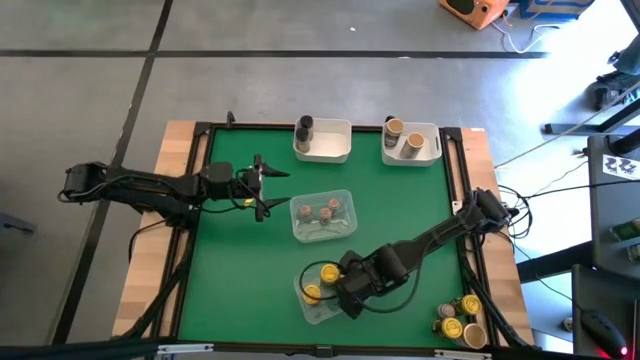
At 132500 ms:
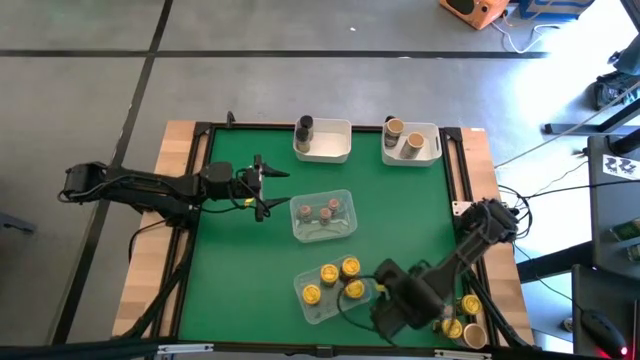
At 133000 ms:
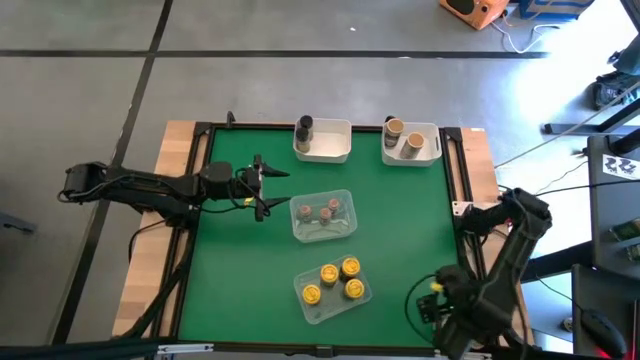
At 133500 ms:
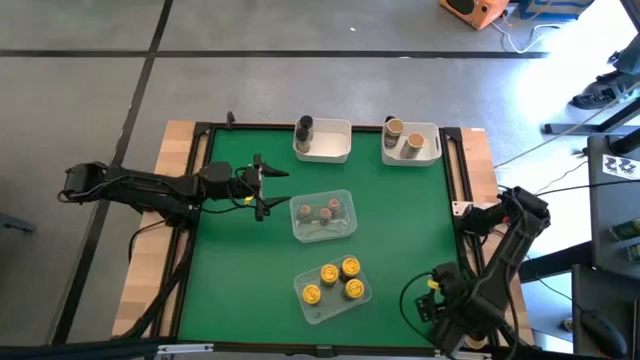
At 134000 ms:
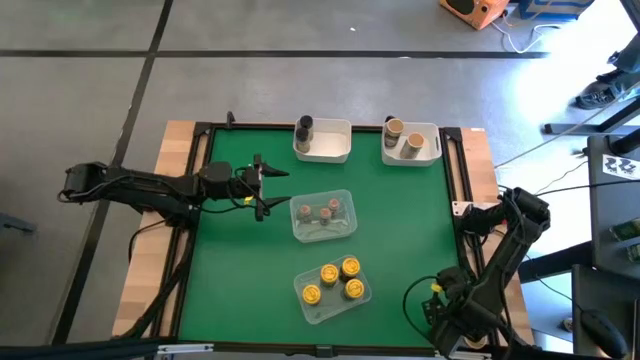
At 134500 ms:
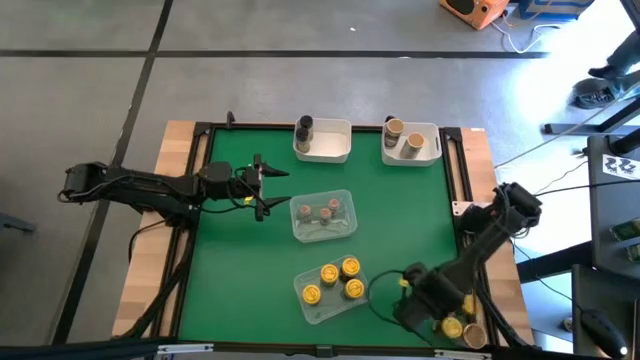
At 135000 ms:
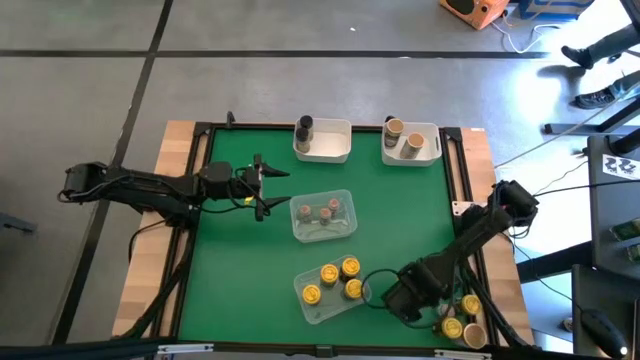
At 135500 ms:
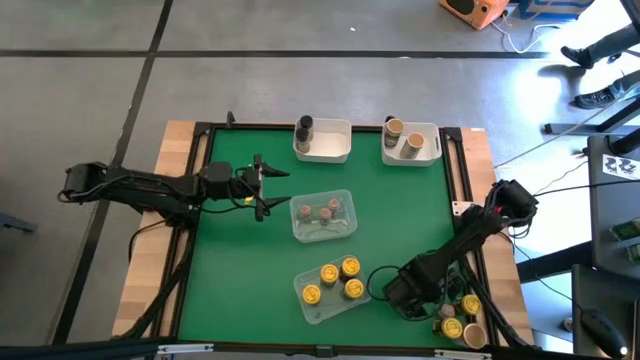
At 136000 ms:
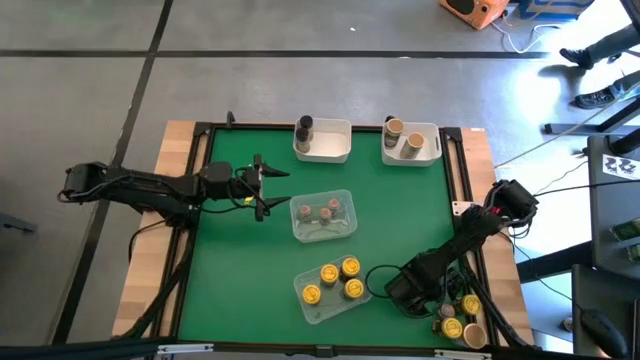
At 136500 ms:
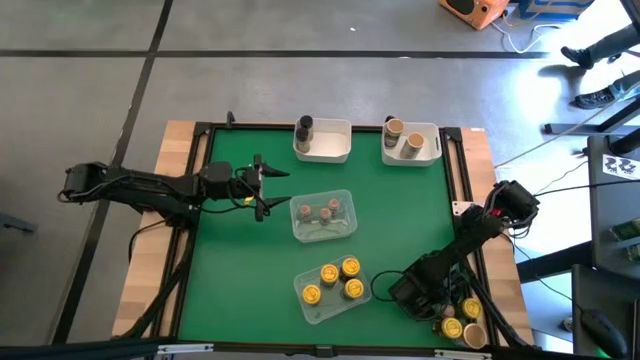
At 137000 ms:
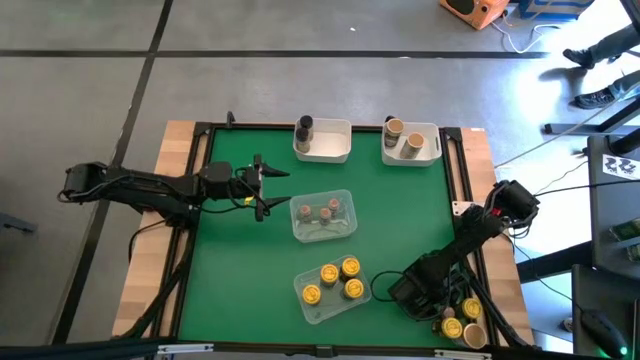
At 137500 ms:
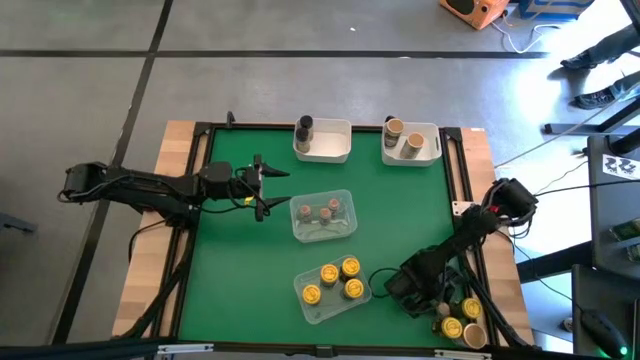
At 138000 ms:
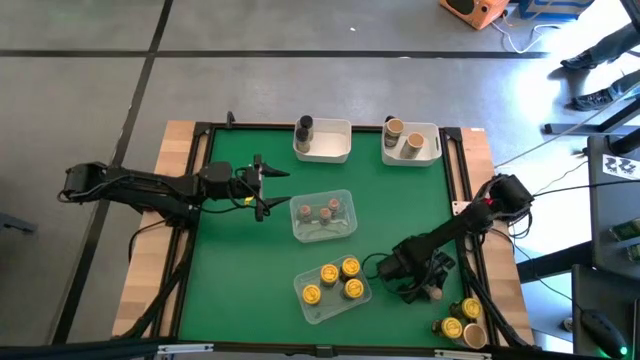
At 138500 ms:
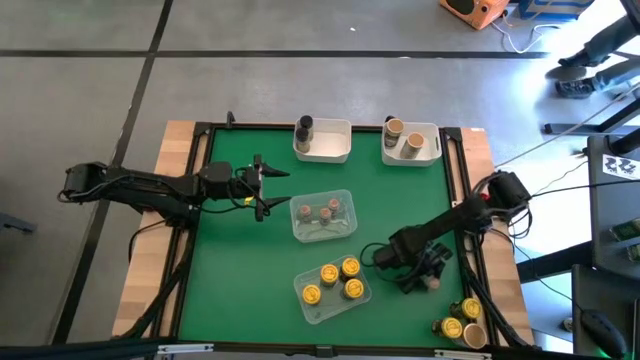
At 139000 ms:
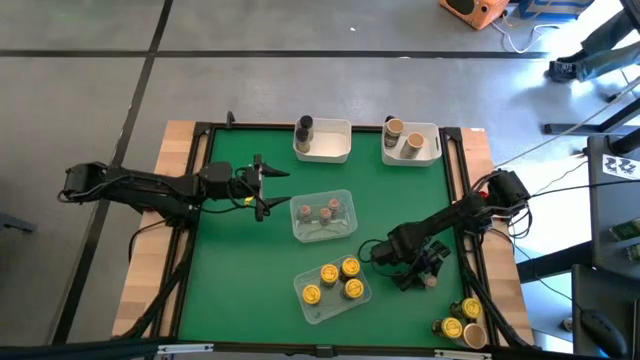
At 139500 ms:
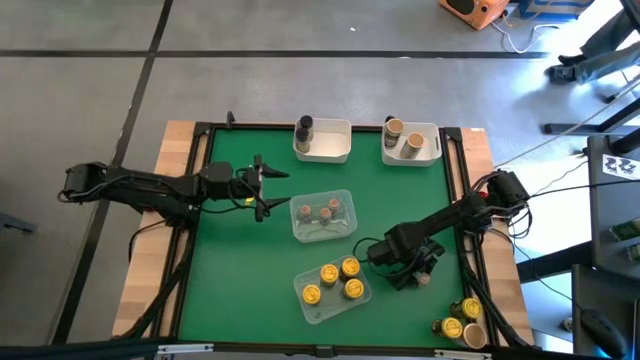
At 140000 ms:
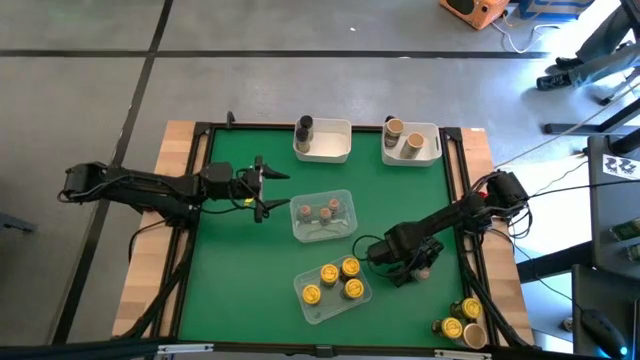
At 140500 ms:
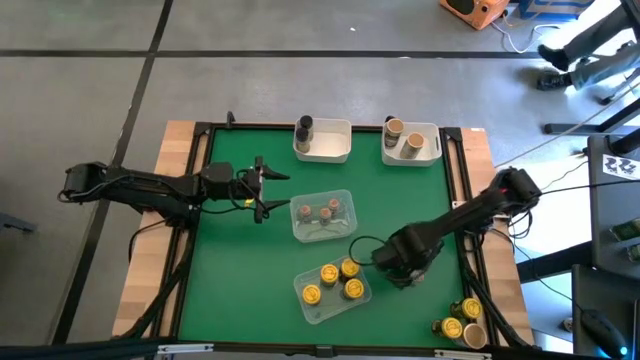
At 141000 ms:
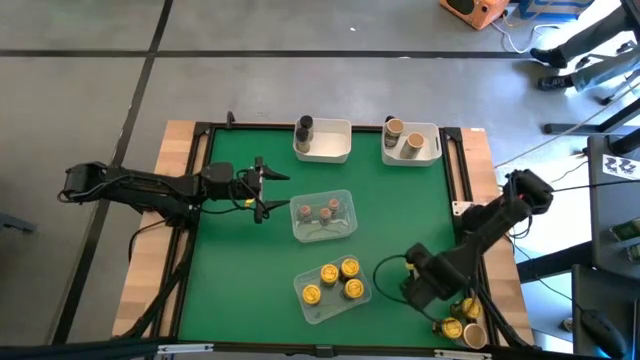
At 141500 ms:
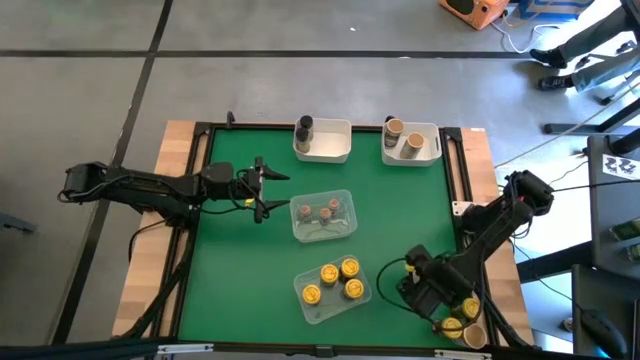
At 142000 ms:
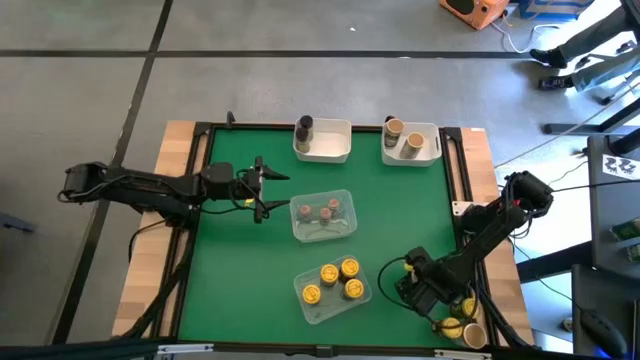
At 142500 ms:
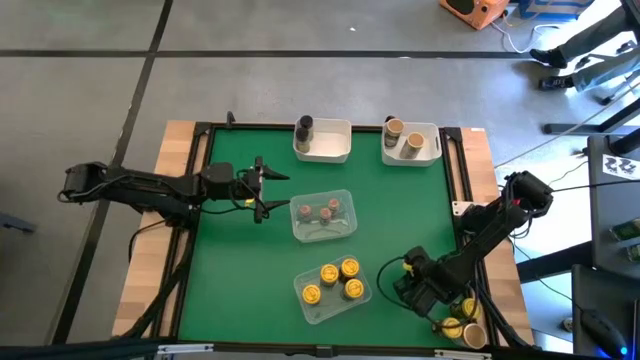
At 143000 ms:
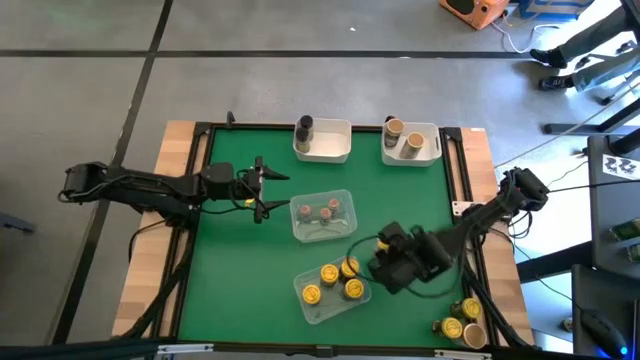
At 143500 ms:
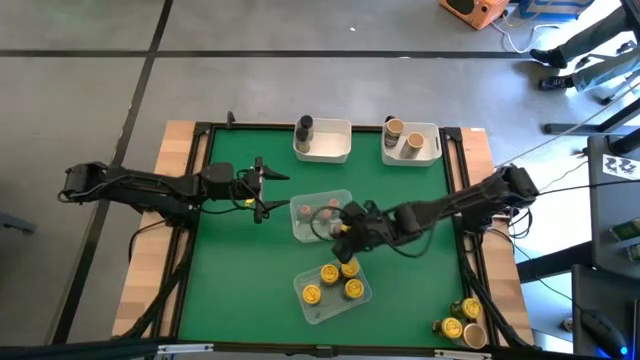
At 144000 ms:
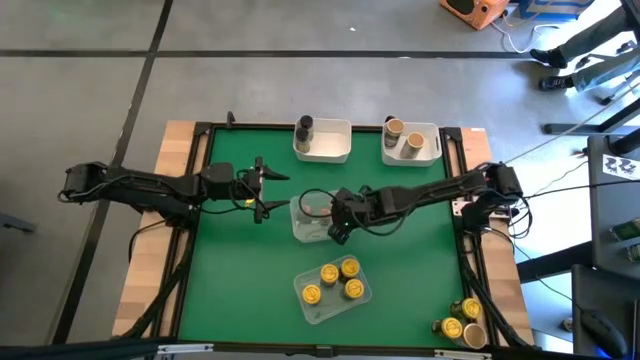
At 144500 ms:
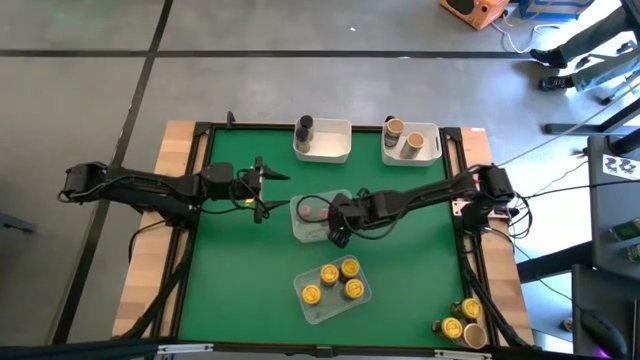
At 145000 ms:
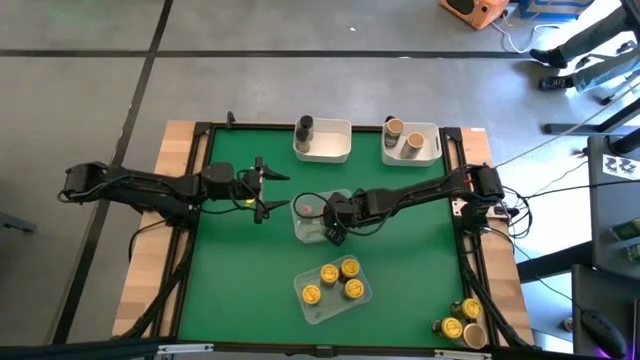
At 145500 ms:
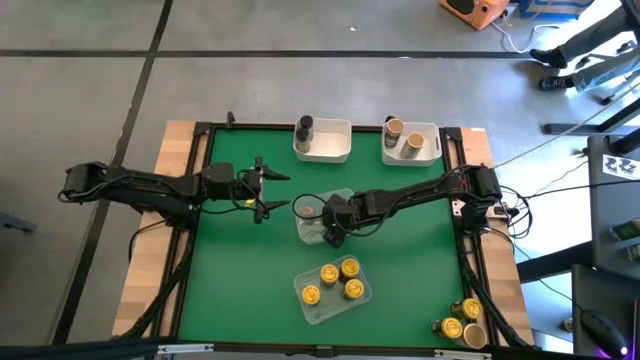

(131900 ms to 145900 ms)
Task: Sort spices by type
Put the transparent seasoning bottle into the center transparent bin

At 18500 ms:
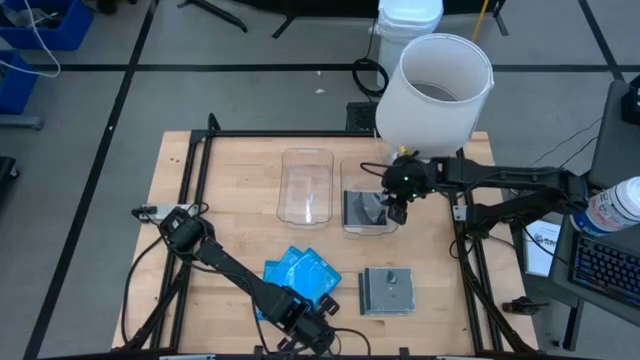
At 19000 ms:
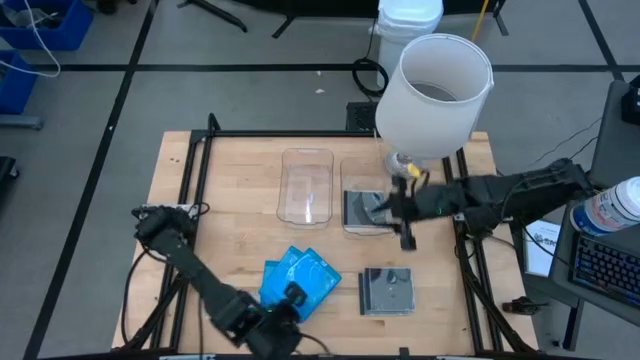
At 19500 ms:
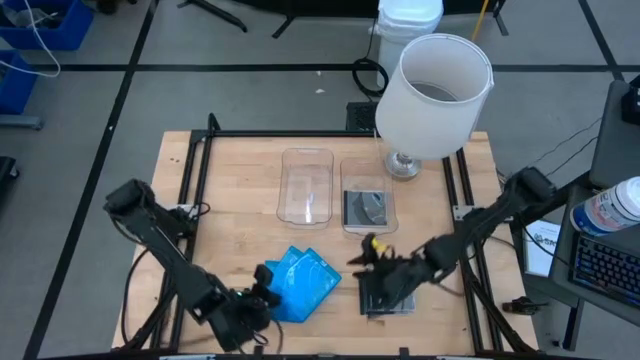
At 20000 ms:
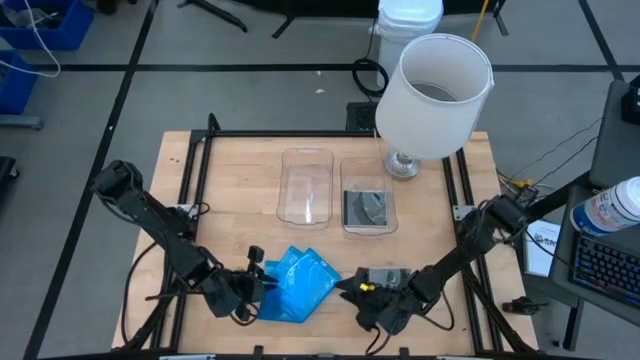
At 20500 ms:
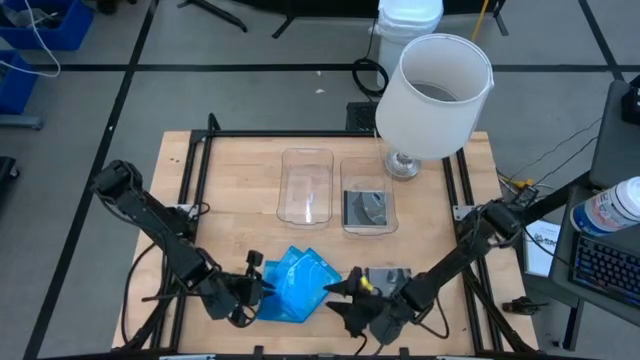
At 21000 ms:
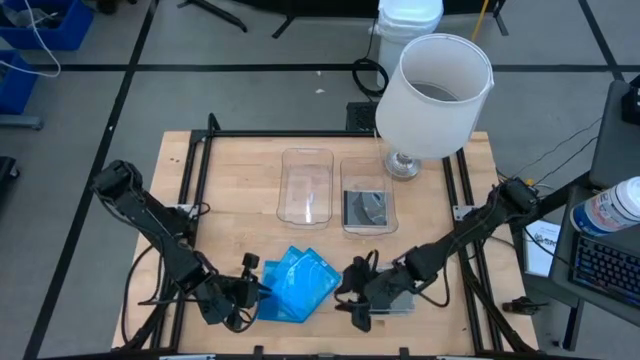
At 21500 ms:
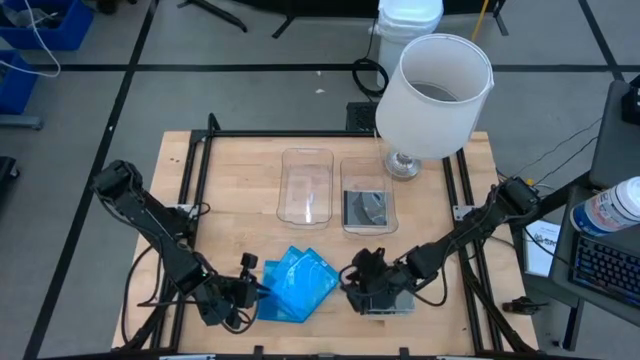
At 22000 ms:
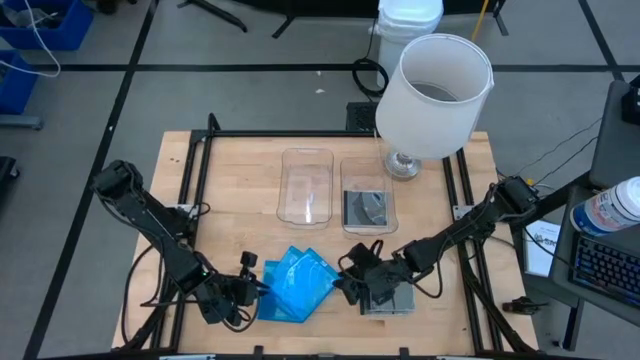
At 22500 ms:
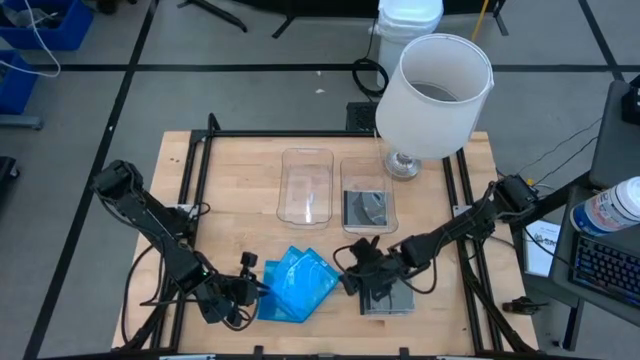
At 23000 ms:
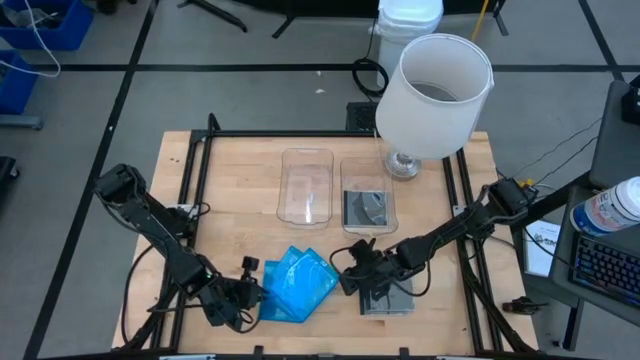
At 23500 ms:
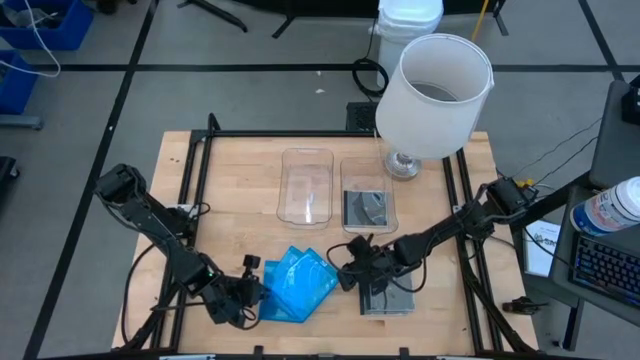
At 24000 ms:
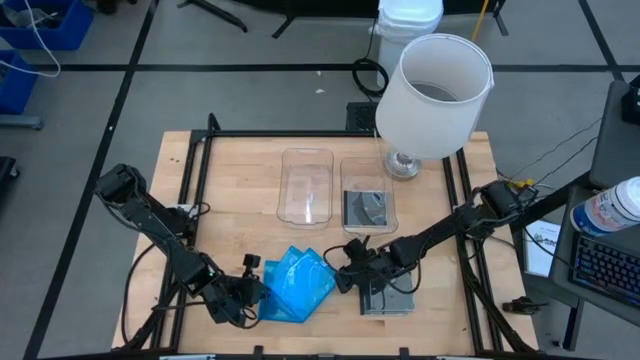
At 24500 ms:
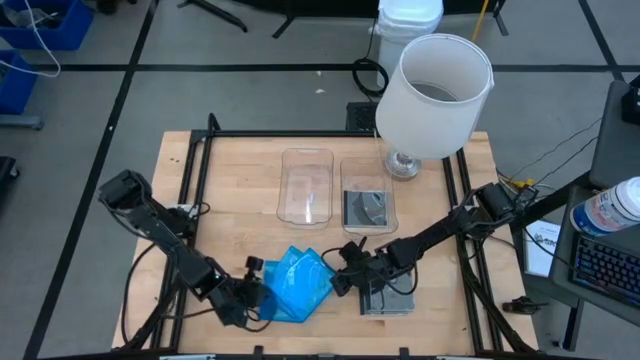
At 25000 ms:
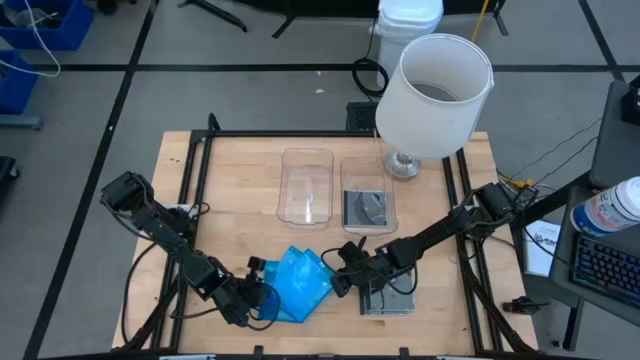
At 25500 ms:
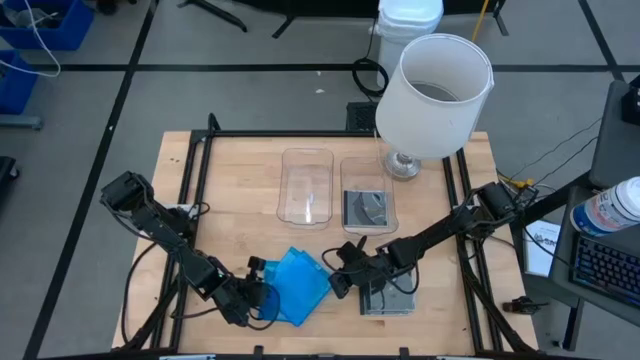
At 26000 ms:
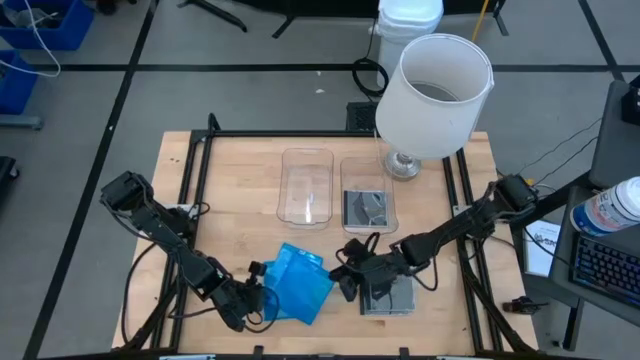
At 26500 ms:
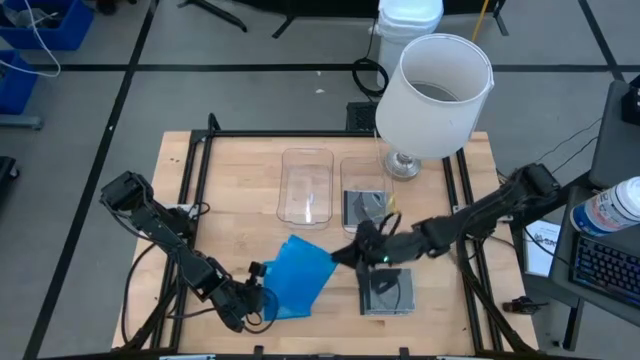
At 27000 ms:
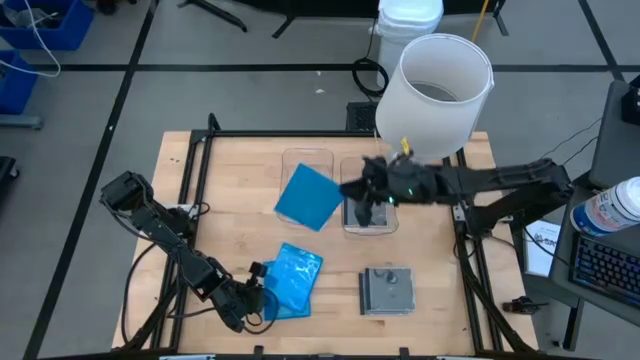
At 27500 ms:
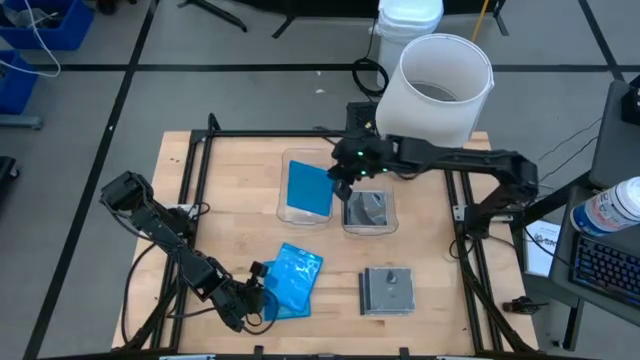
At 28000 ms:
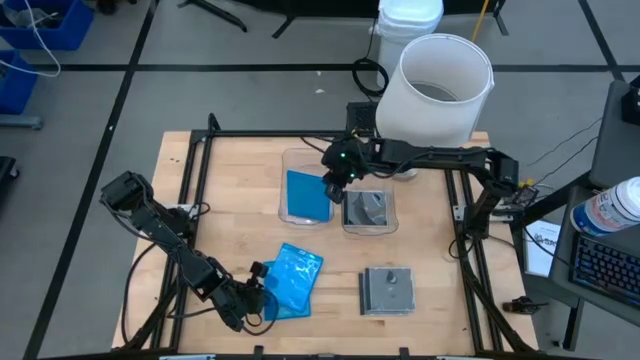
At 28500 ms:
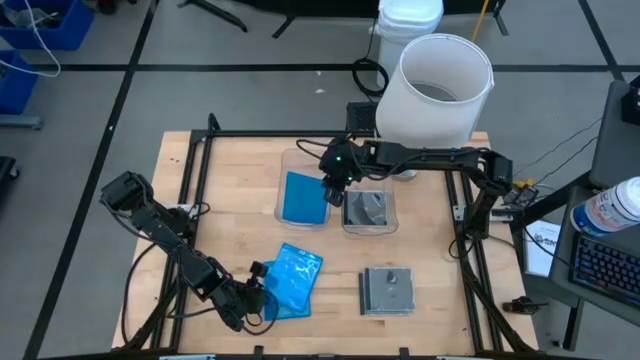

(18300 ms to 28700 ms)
Task: Pick & place jewel cases by type
Put the blue cd case into the left transparent bin
